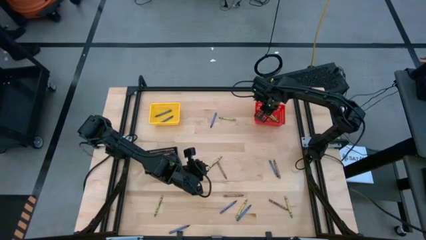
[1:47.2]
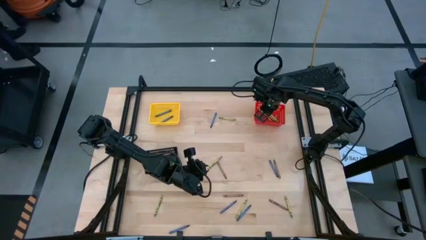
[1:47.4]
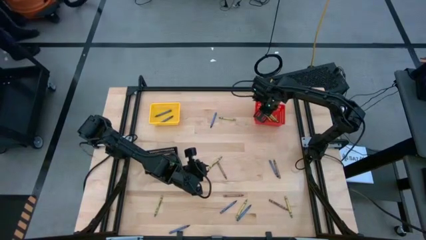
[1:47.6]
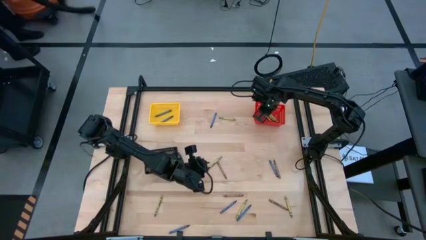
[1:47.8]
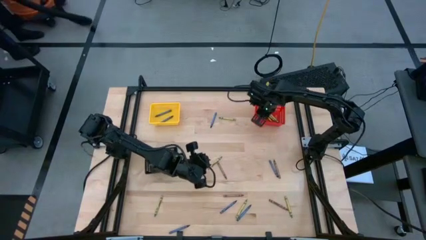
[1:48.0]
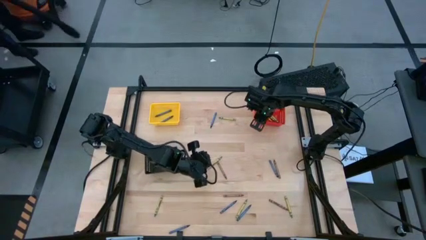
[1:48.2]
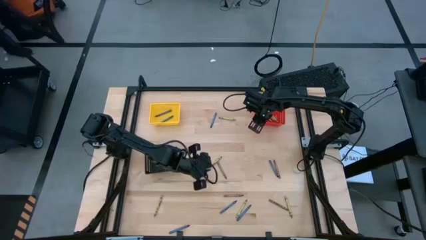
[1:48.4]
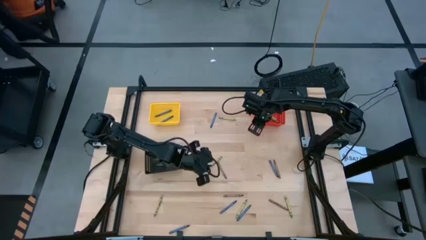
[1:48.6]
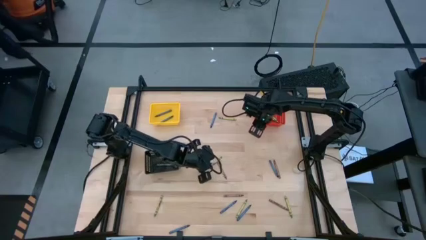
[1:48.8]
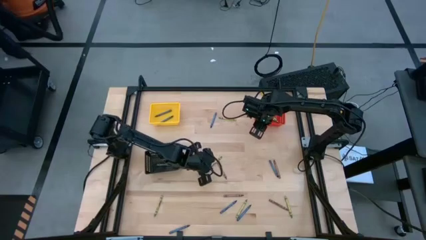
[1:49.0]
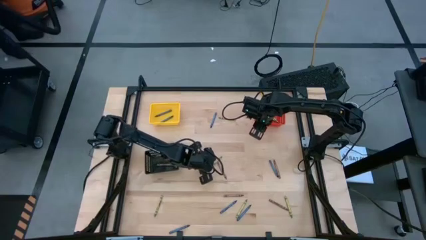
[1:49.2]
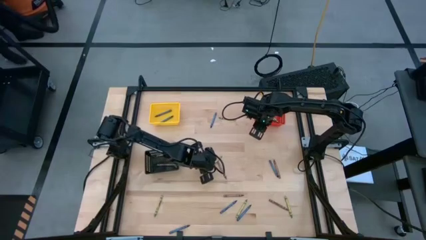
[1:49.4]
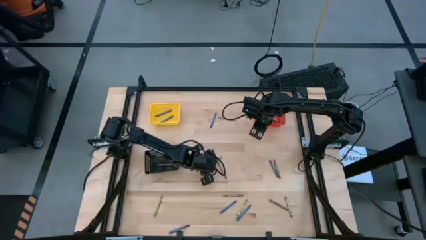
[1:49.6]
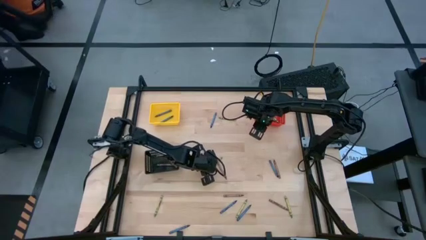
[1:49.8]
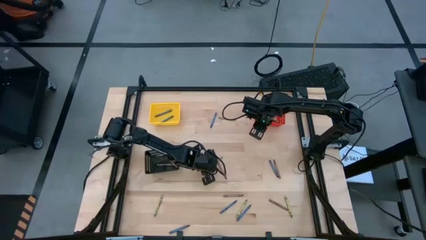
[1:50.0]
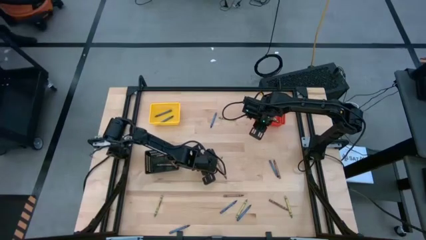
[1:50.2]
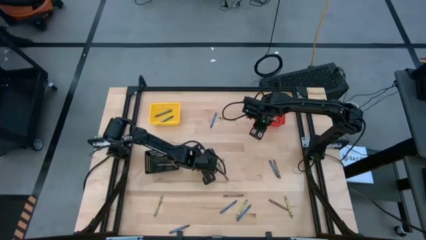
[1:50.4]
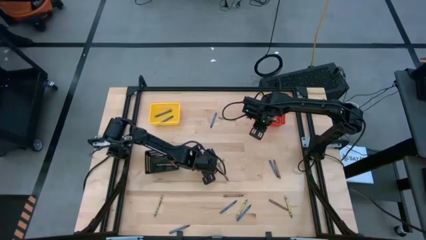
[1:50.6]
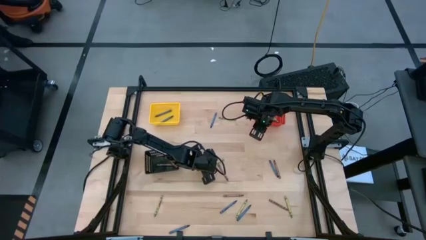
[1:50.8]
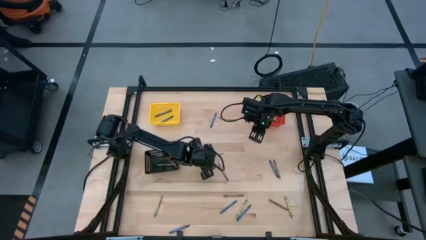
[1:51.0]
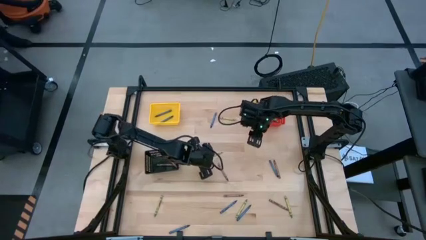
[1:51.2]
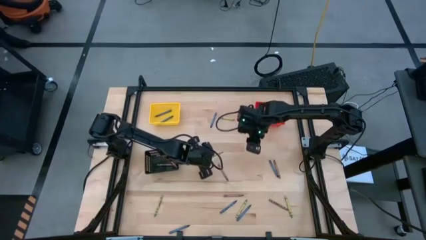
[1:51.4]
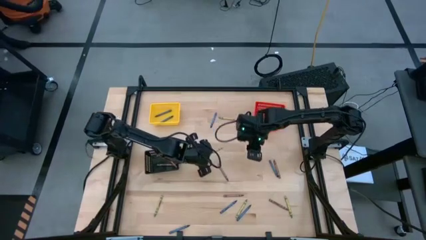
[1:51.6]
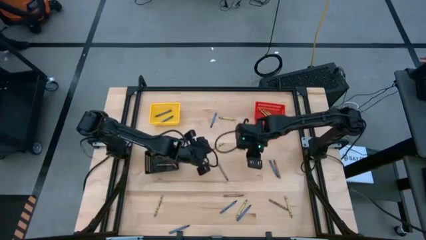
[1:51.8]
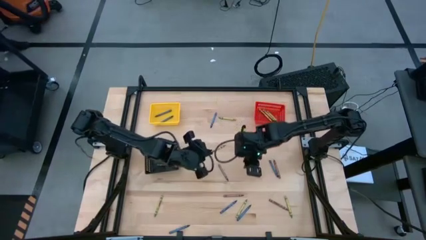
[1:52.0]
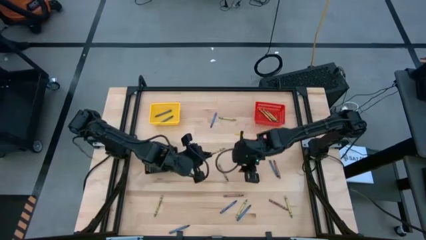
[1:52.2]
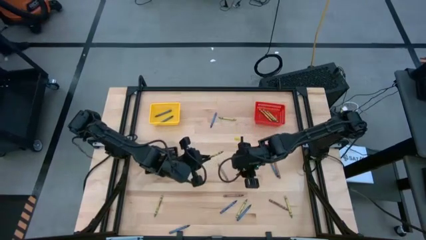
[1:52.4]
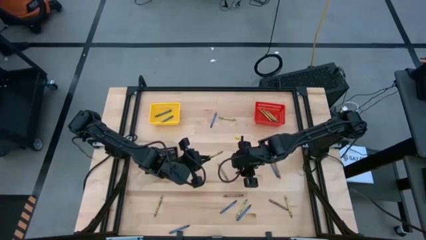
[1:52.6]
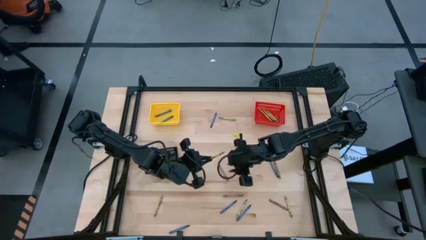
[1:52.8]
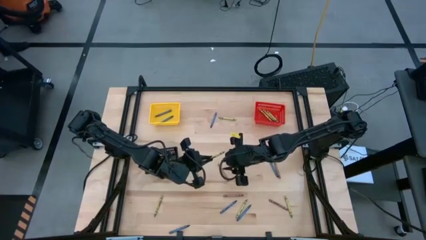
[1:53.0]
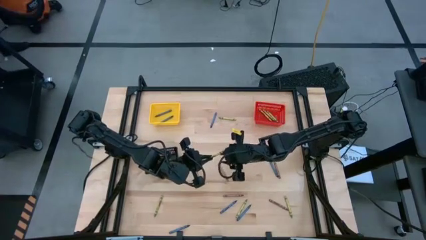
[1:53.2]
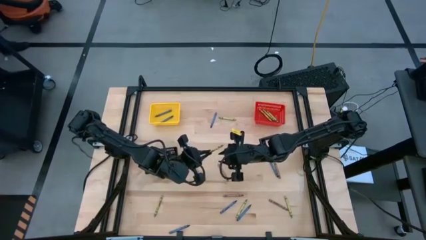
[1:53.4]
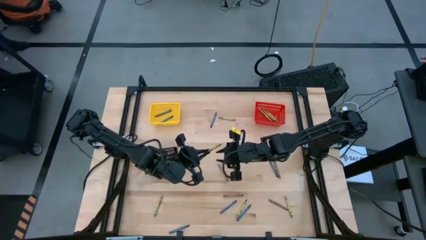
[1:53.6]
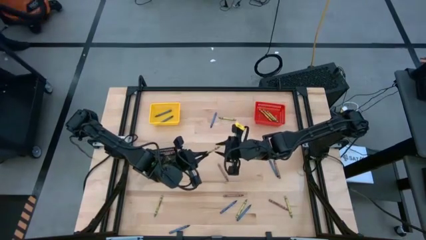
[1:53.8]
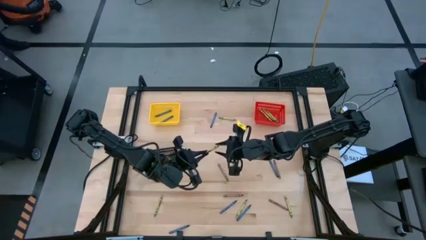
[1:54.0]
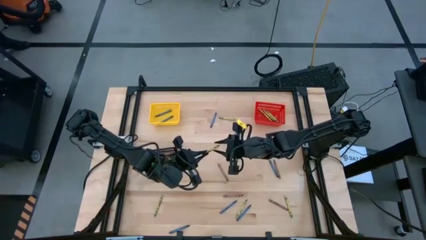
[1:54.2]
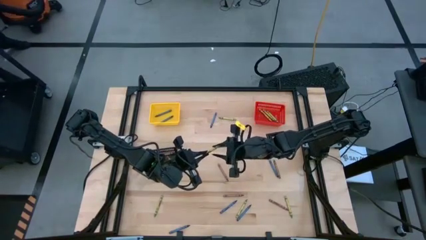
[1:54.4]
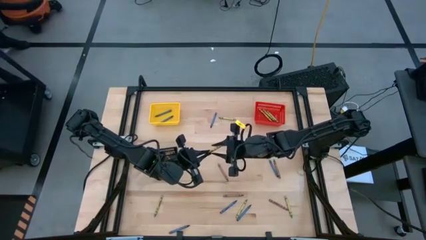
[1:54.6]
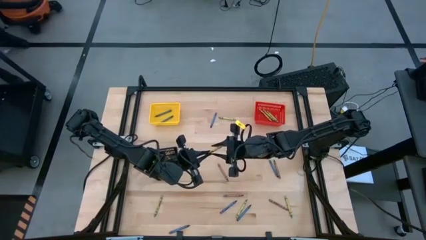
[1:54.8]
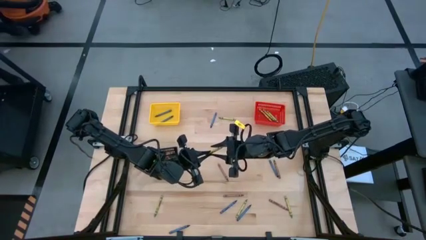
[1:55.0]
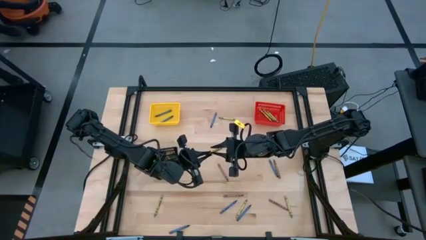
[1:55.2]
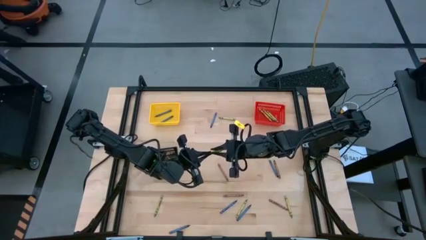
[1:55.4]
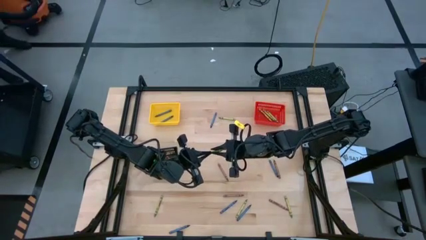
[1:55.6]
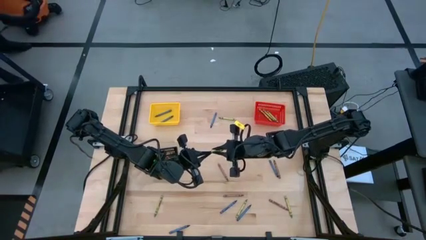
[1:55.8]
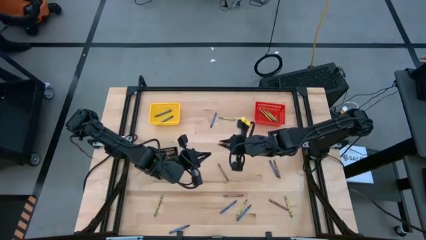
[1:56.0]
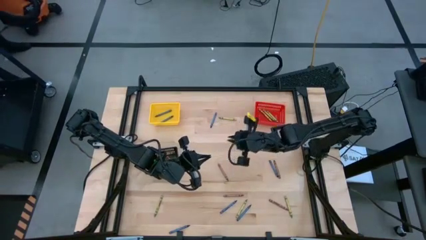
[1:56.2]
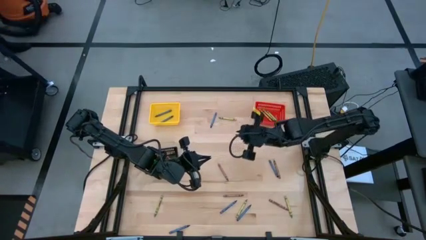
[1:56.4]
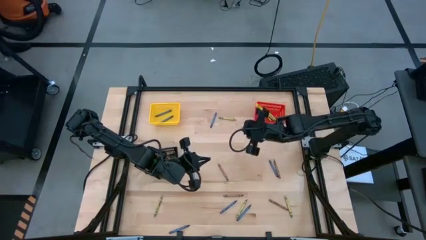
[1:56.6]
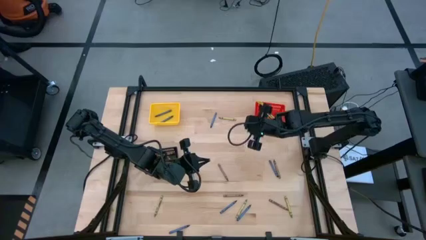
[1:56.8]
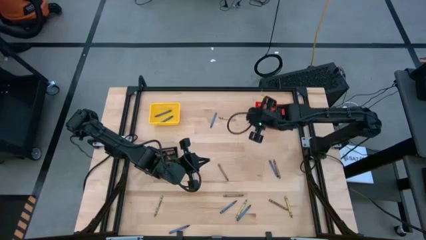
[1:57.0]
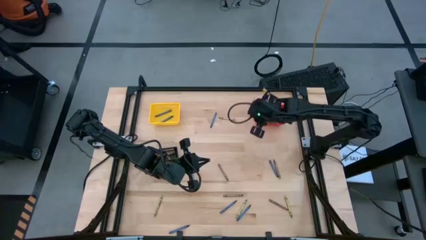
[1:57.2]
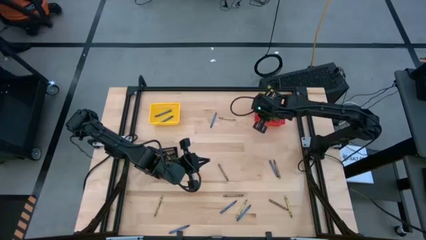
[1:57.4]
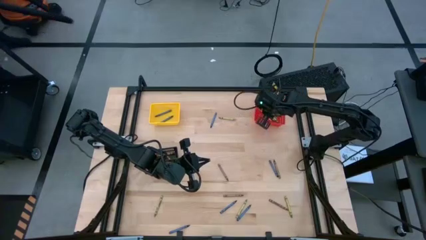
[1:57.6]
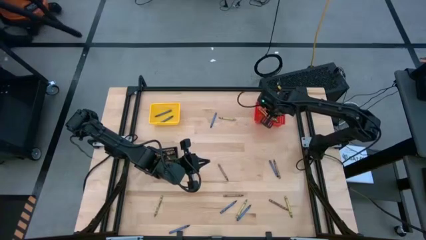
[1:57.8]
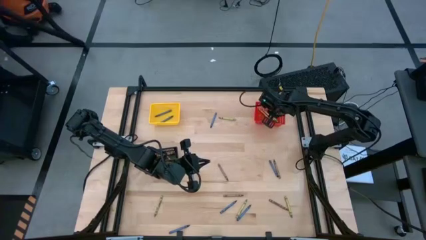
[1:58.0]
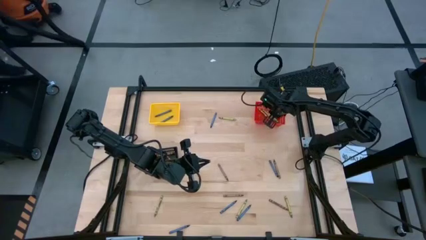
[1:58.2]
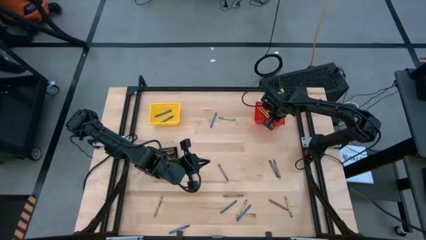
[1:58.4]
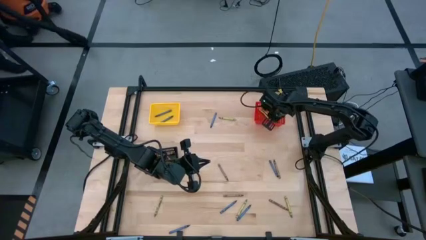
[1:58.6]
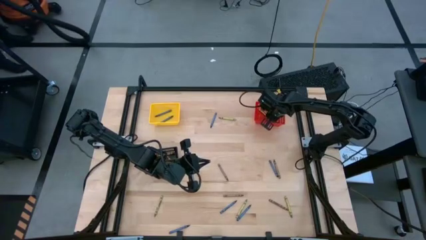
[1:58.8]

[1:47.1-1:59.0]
Task: Sort crayons
Put the green crayon into the red bin
